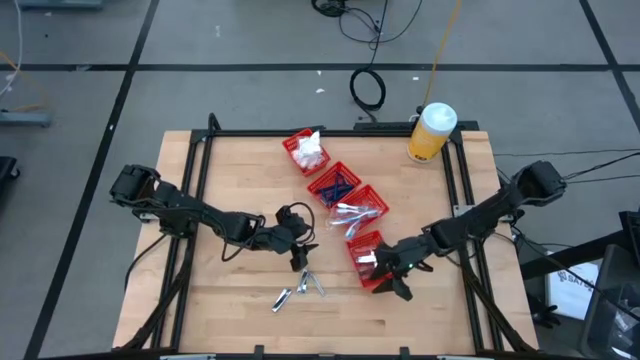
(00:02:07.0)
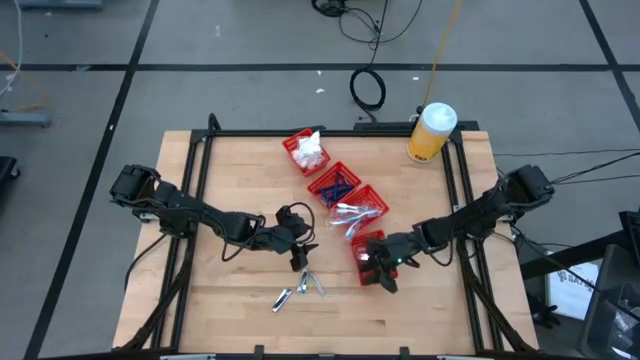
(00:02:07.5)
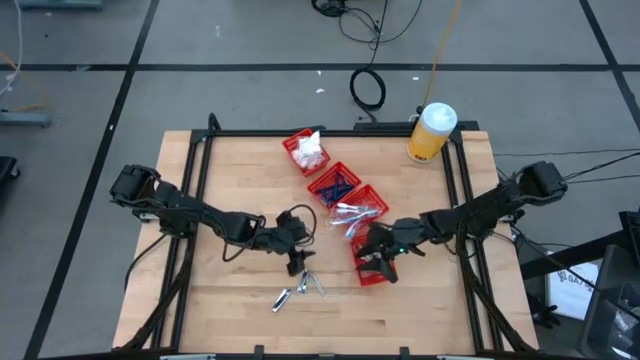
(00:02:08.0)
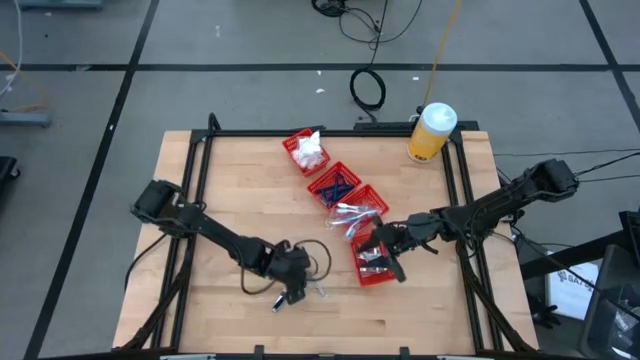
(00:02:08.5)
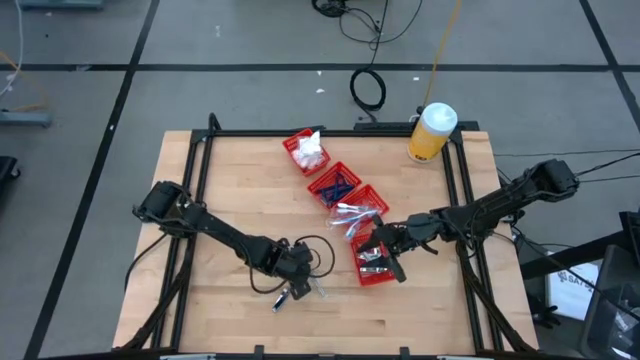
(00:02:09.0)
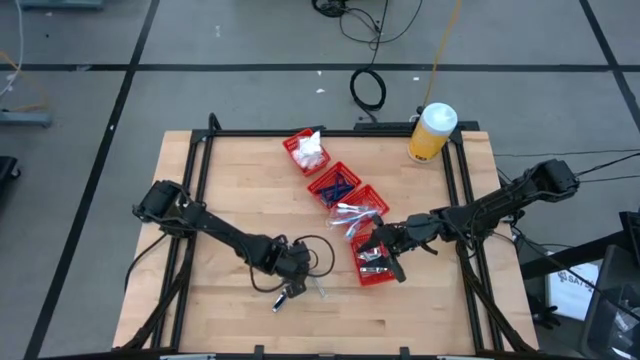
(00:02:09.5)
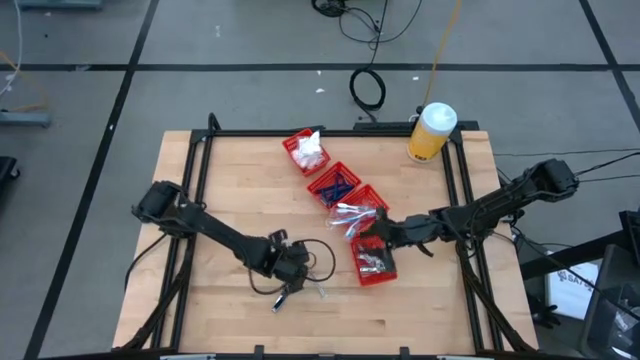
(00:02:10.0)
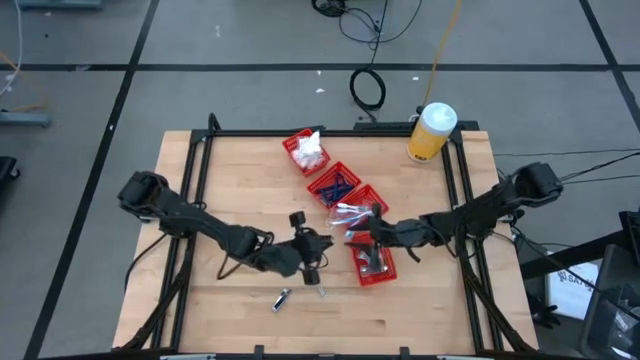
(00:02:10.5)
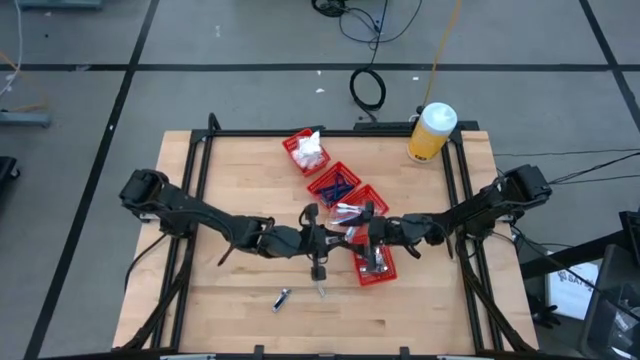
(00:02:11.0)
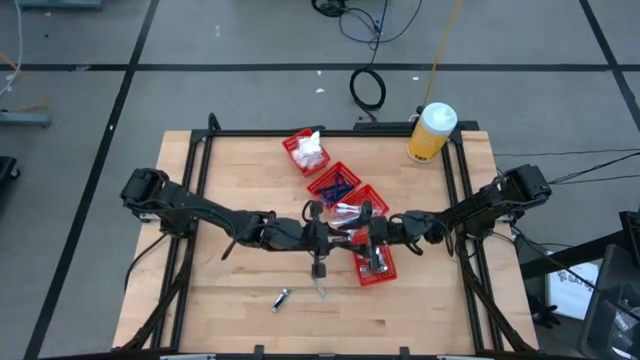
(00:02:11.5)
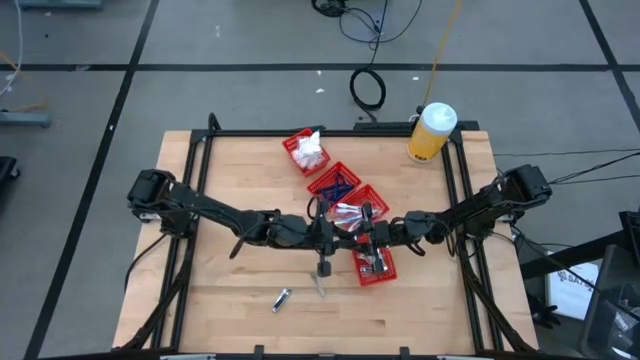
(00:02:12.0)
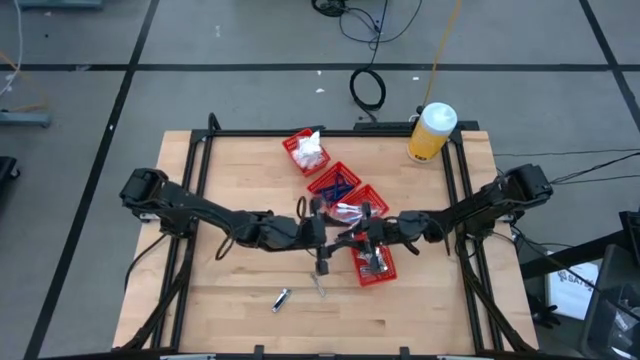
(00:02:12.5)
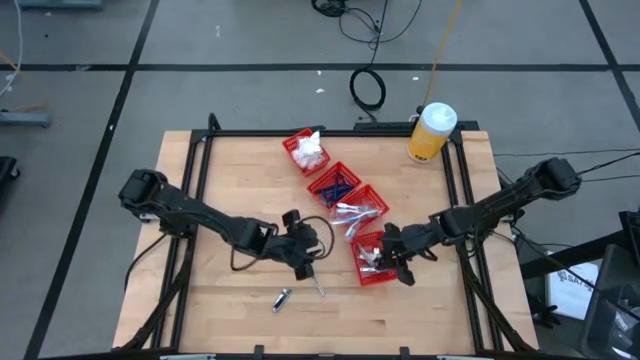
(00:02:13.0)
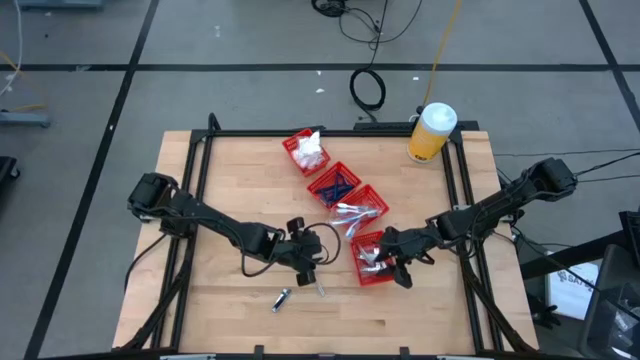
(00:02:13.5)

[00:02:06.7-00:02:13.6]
Task: Pick & Place Travel size toiletries
Put the nail cutter into the bottom red bin

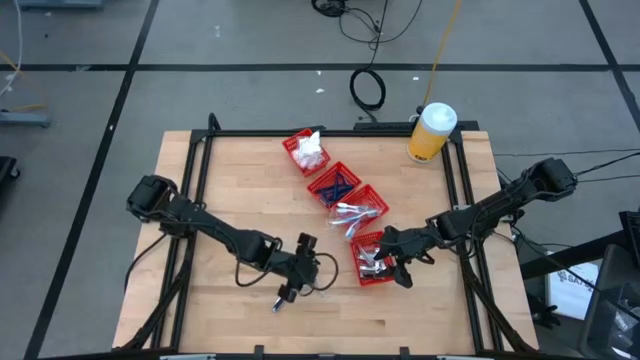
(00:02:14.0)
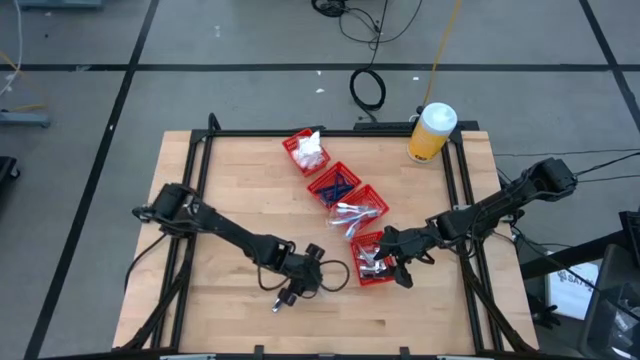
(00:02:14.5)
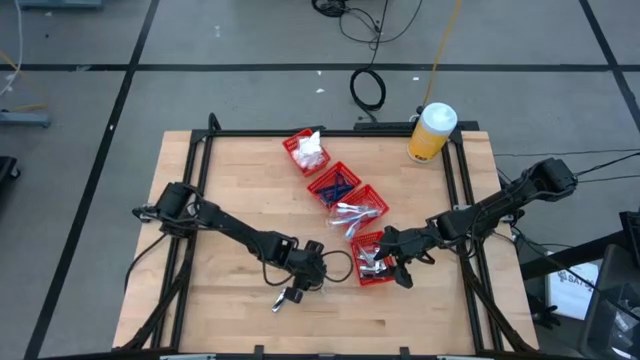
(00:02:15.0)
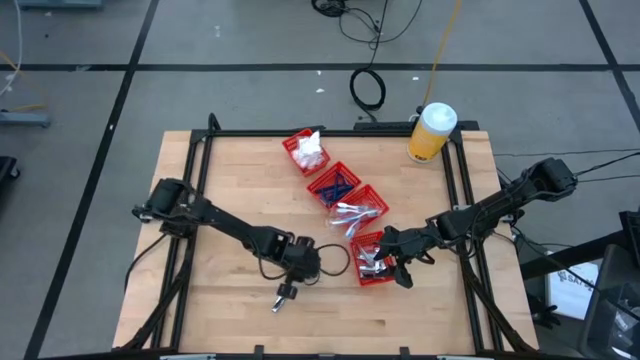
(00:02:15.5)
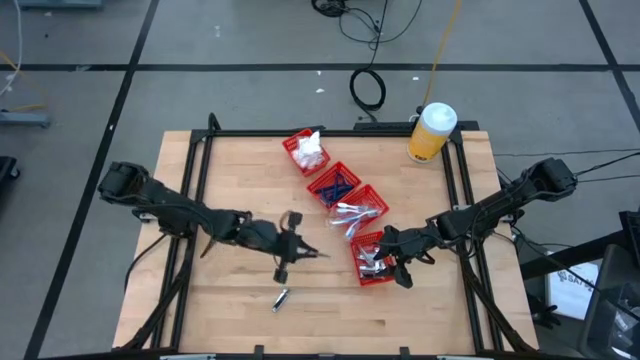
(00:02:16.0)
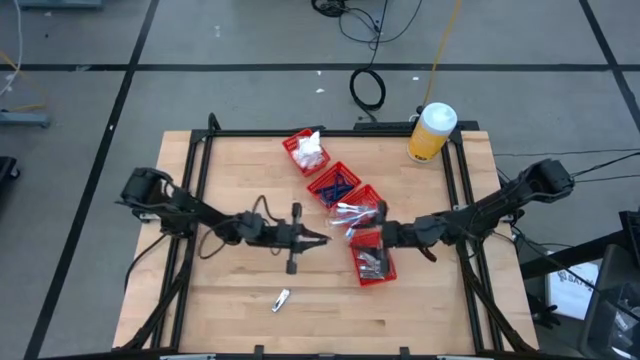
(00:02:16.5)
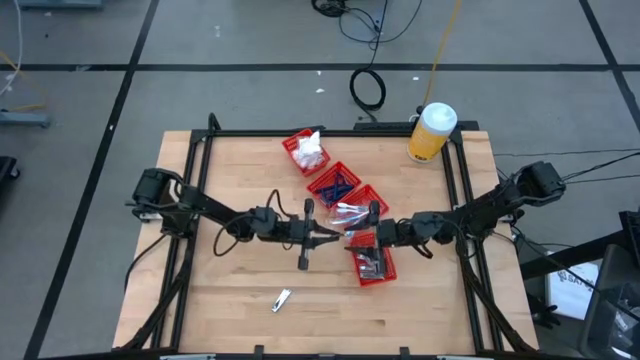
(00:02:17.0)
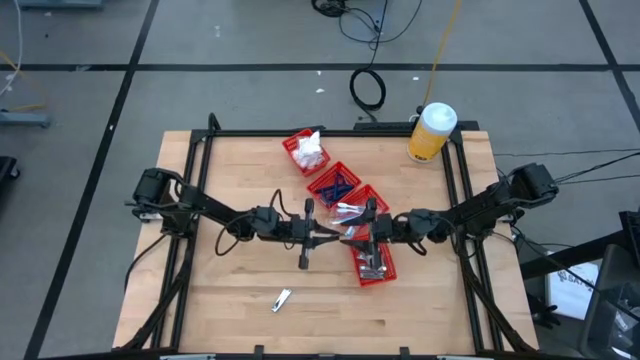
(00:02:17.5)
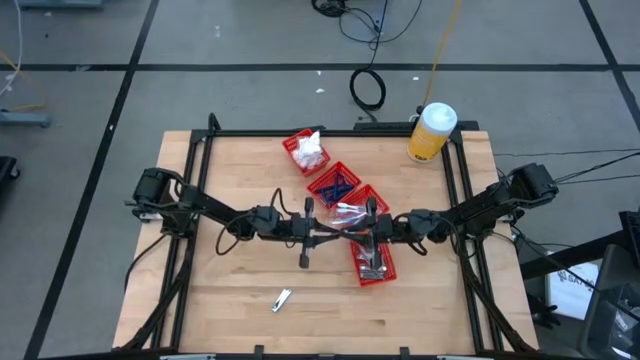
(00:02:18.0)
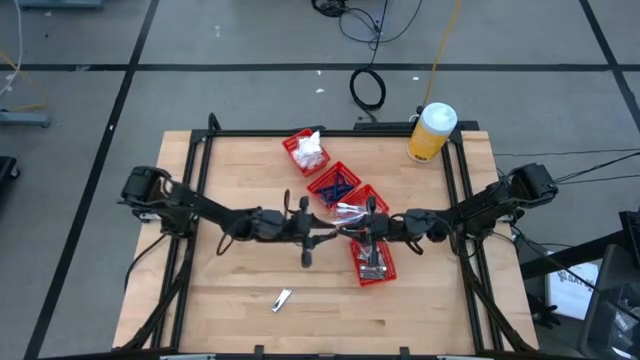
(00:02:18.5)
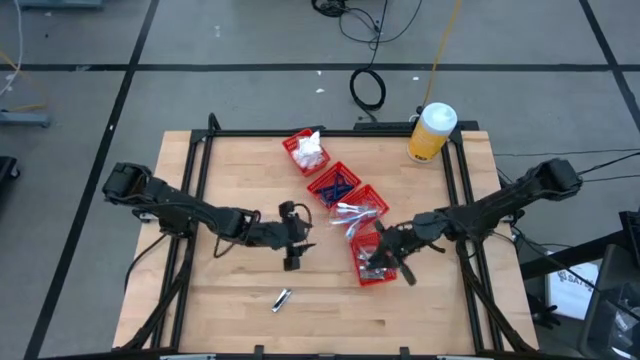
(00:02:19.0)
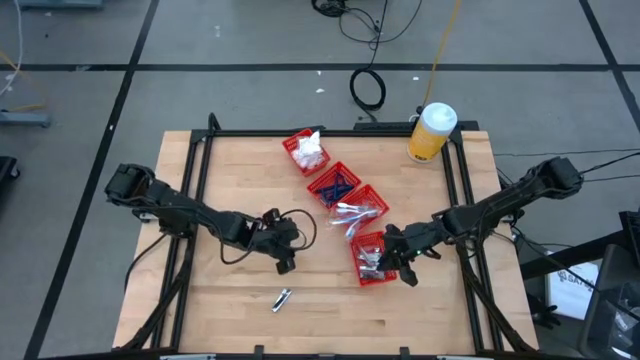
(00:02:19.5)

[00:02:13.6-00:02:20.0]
Put the nail cutter into the bottom red bin

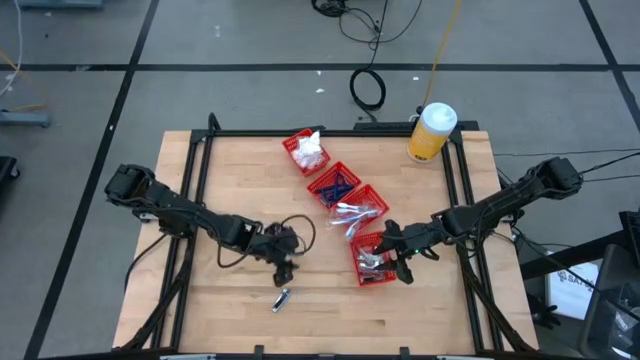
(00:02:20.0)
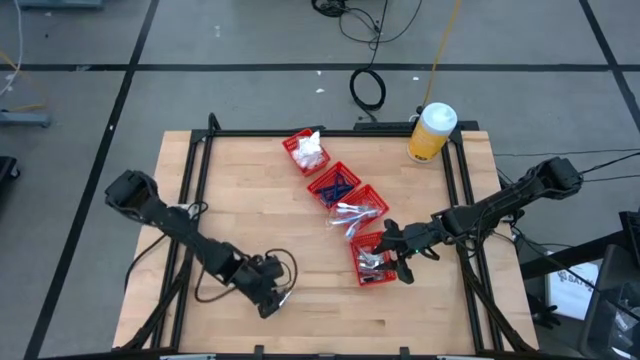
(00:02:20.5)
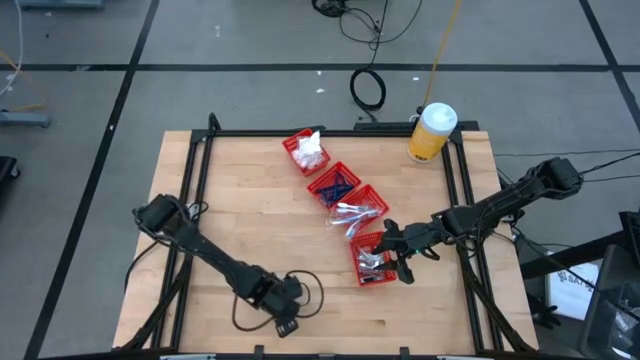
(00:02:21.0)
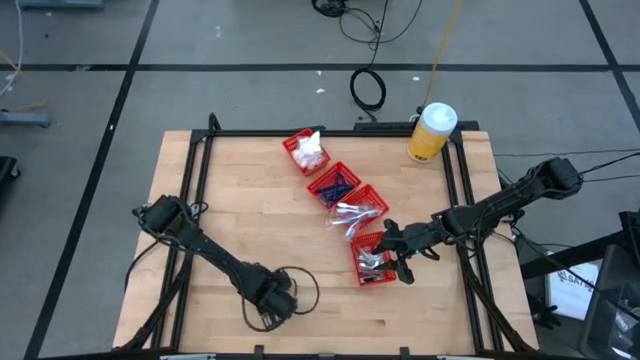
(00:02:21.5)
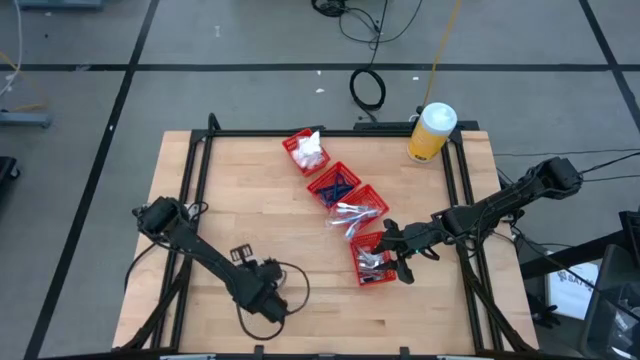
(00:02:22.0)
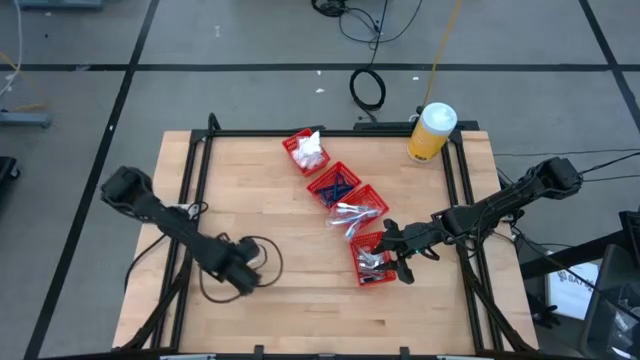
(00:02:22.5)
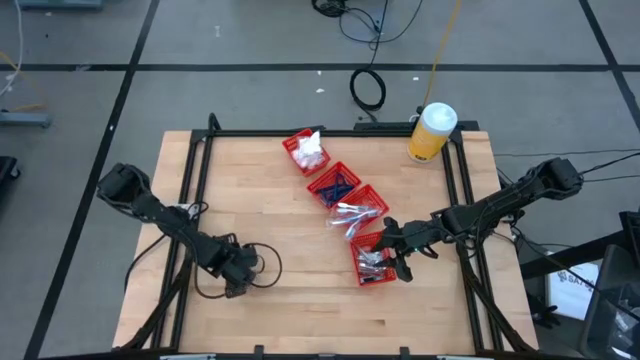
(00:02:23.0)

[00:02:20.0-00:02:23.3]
Put the nail cutter into the bottom red bin

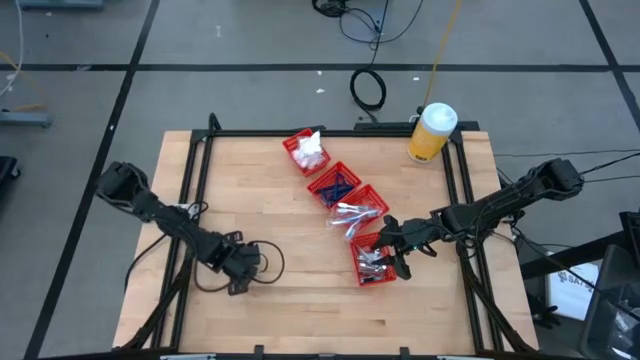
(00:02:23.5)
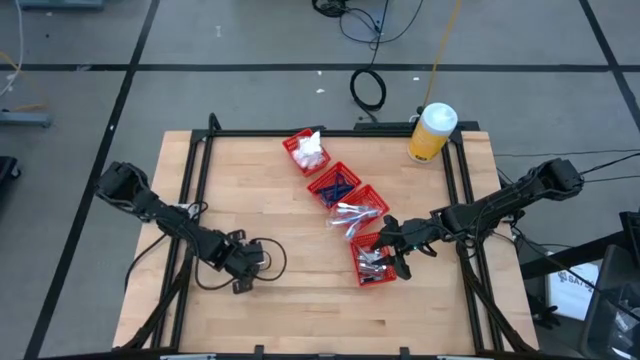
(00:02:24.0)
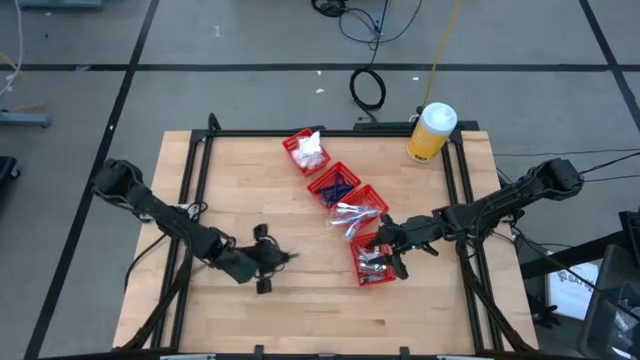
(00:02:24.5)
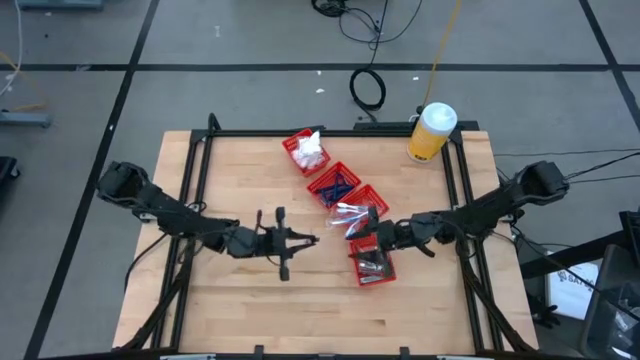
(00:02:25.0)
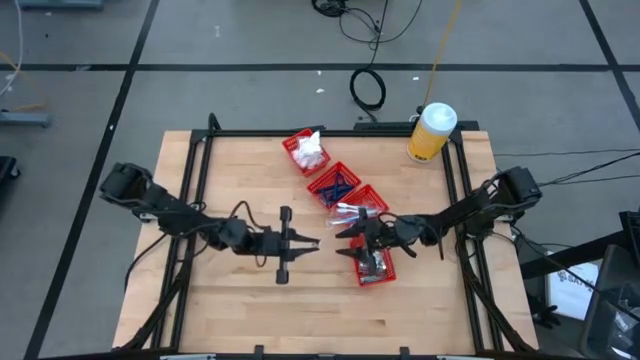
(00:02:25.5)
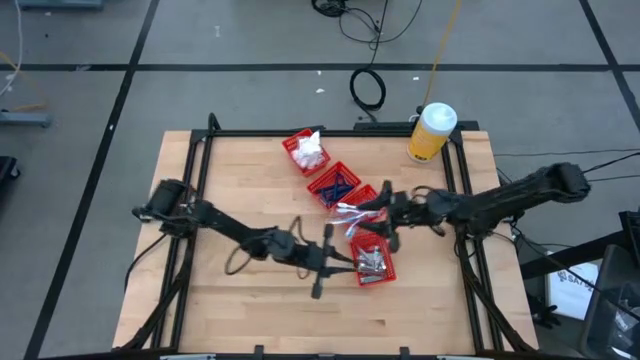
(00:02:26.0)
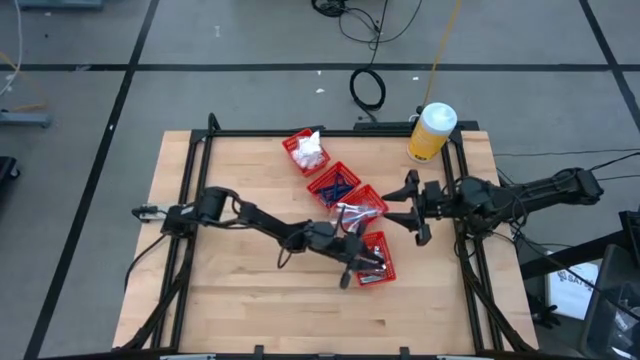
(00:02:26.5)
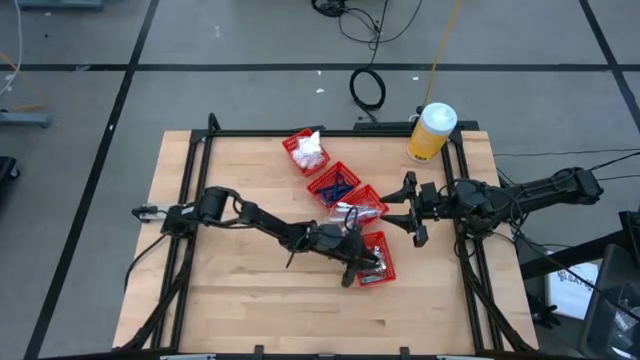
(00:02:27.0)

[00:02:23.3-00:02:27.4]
Put the nail cutter into the bottom red bin
